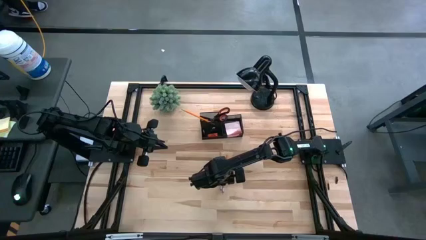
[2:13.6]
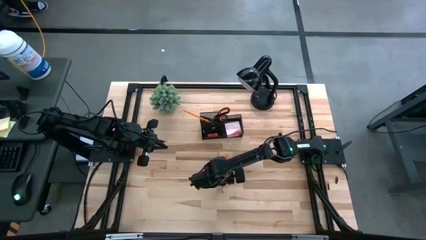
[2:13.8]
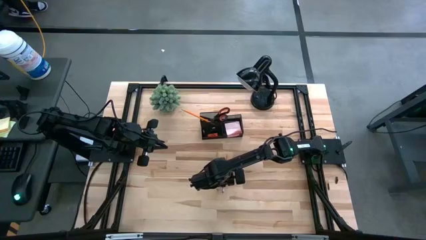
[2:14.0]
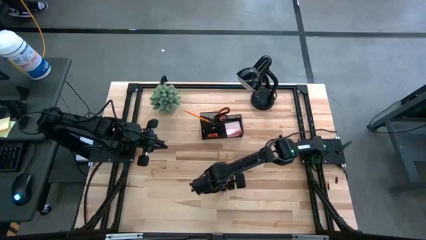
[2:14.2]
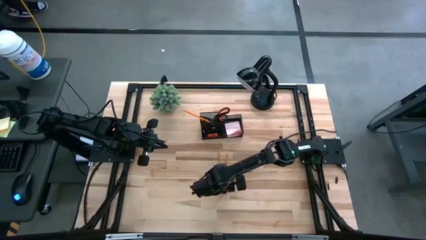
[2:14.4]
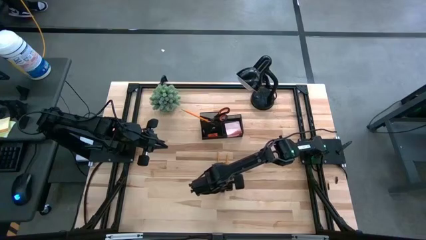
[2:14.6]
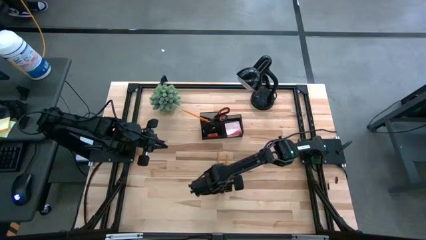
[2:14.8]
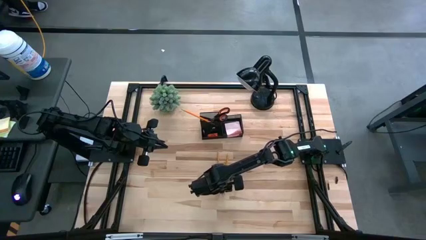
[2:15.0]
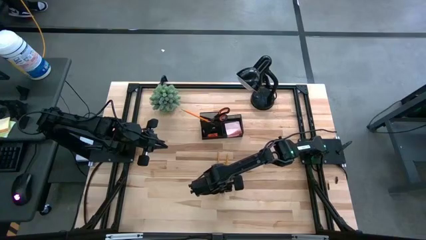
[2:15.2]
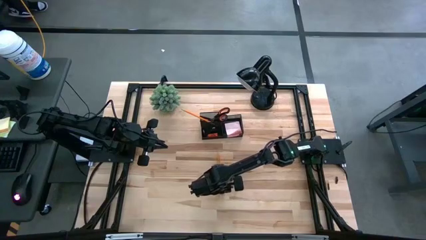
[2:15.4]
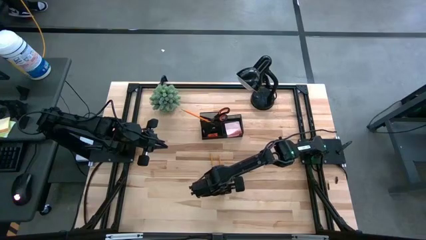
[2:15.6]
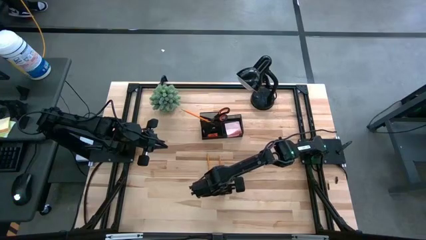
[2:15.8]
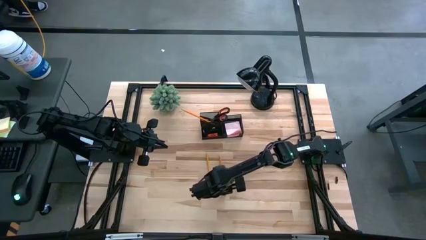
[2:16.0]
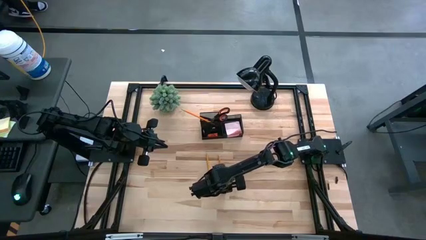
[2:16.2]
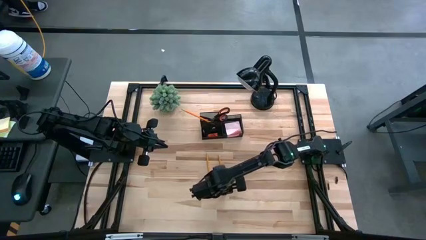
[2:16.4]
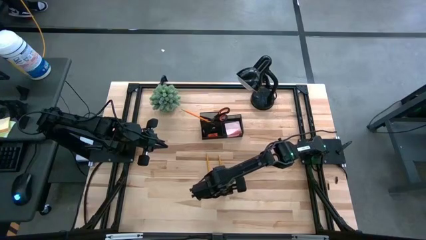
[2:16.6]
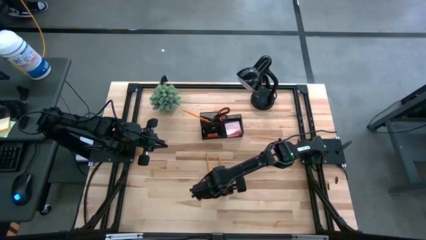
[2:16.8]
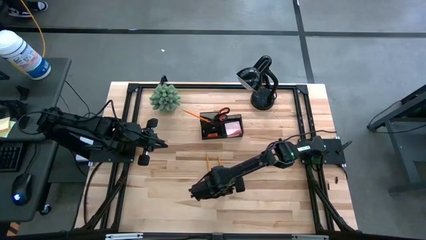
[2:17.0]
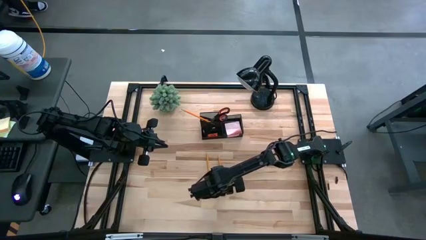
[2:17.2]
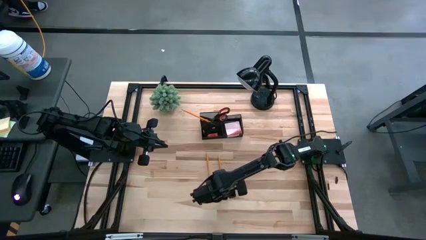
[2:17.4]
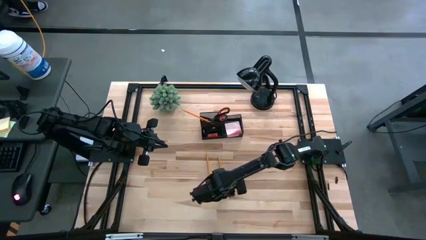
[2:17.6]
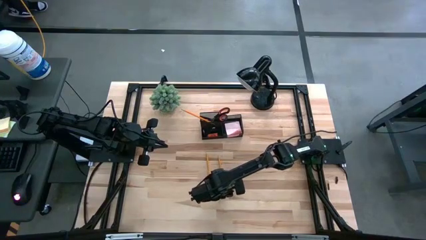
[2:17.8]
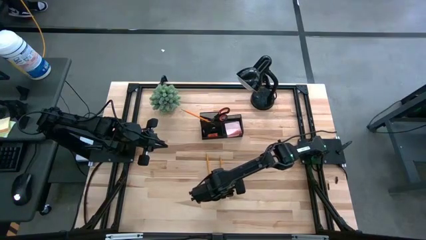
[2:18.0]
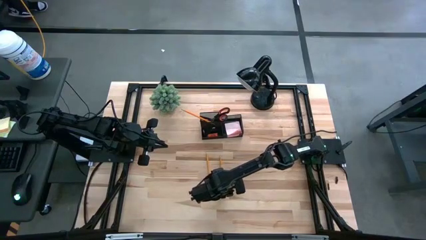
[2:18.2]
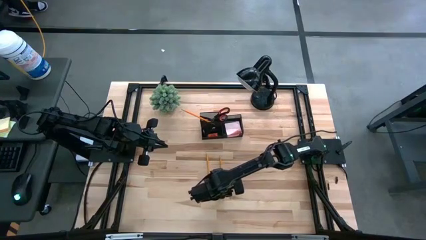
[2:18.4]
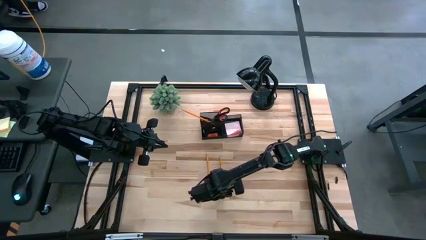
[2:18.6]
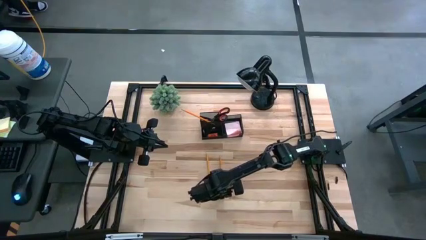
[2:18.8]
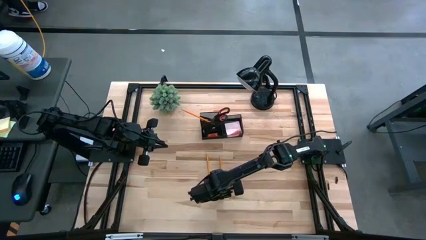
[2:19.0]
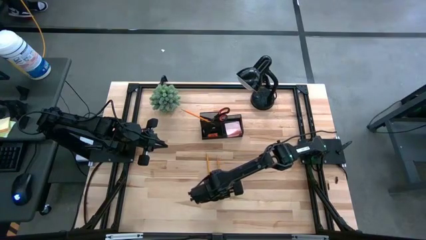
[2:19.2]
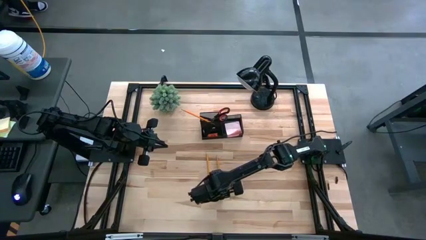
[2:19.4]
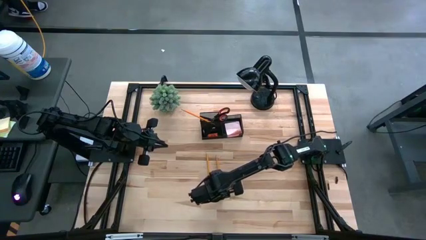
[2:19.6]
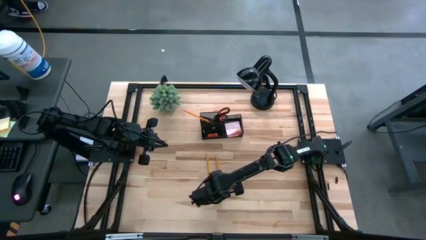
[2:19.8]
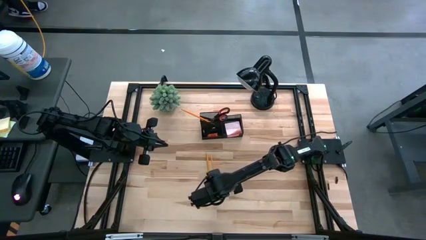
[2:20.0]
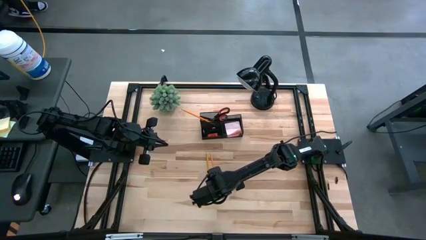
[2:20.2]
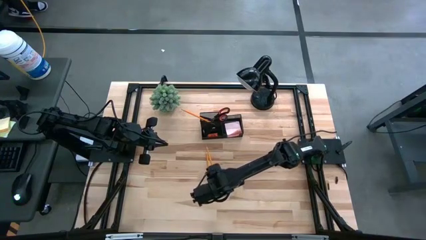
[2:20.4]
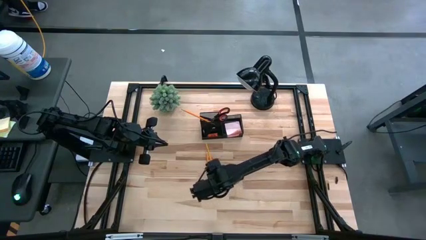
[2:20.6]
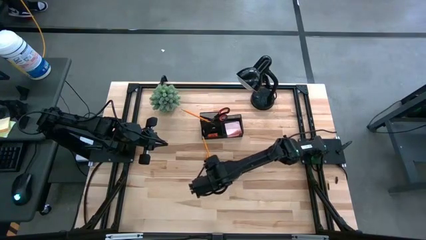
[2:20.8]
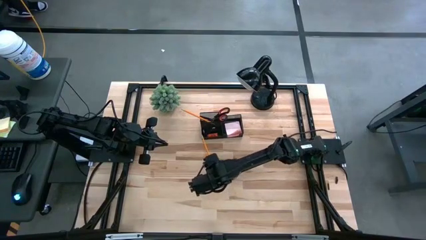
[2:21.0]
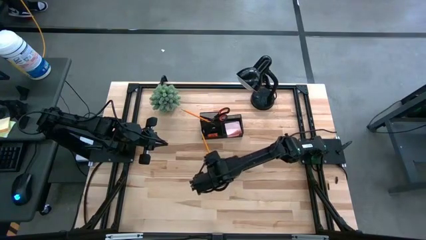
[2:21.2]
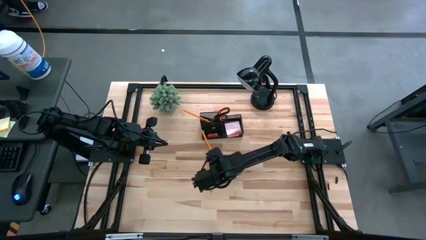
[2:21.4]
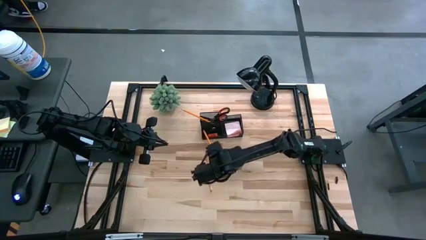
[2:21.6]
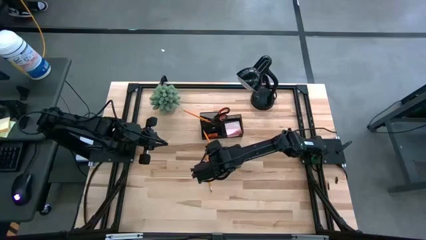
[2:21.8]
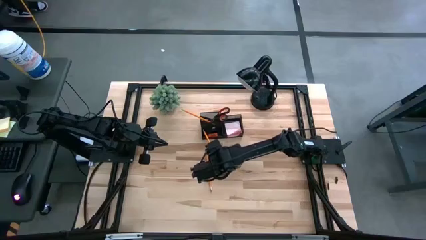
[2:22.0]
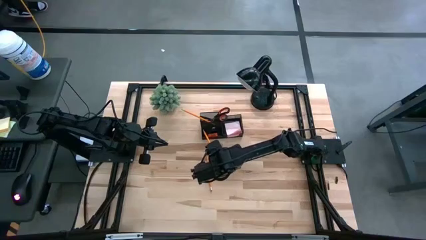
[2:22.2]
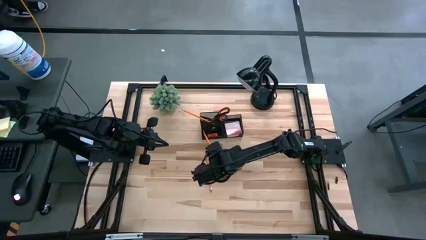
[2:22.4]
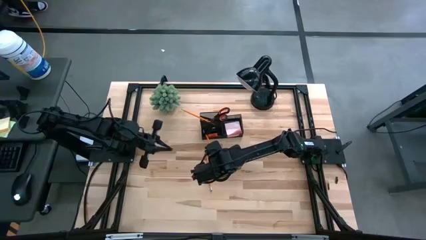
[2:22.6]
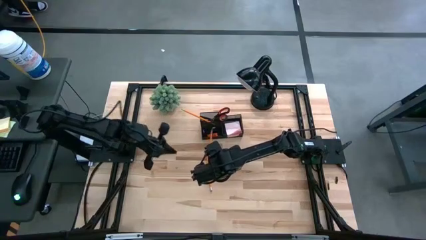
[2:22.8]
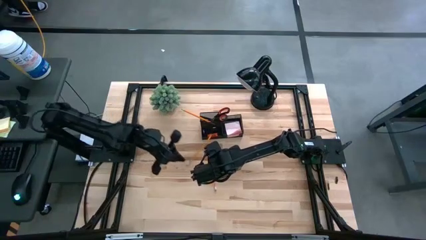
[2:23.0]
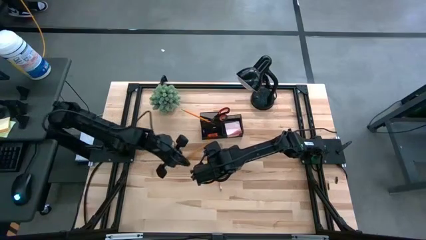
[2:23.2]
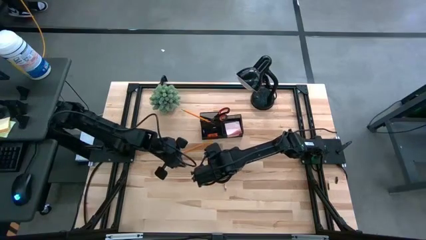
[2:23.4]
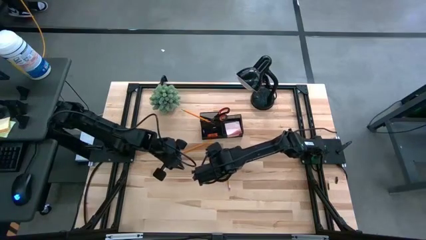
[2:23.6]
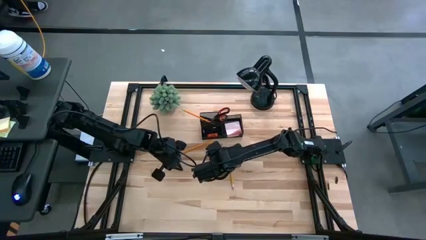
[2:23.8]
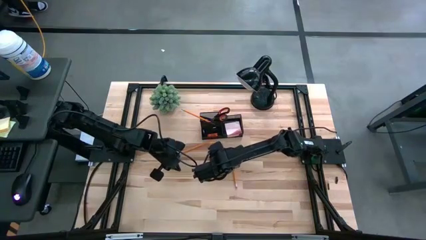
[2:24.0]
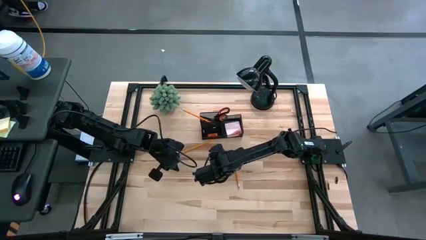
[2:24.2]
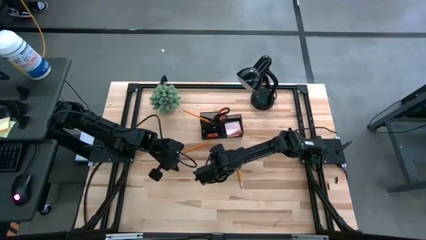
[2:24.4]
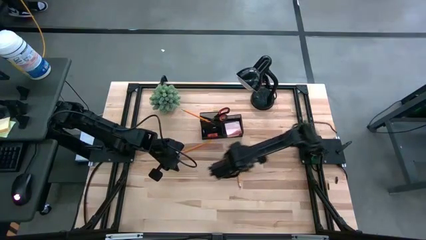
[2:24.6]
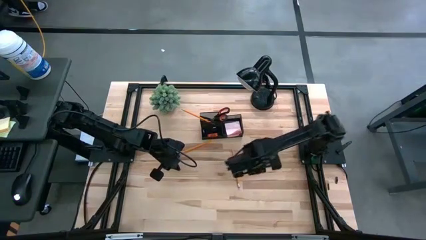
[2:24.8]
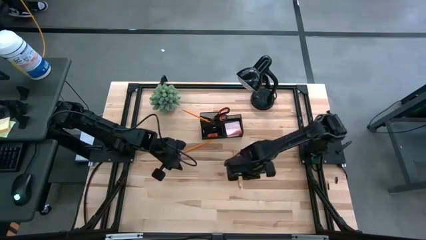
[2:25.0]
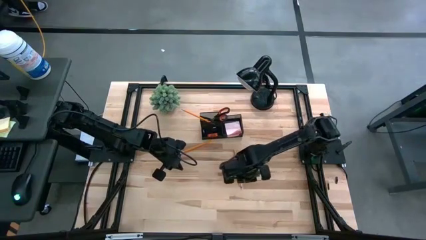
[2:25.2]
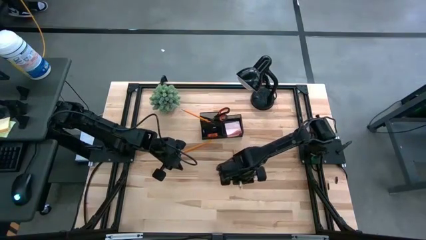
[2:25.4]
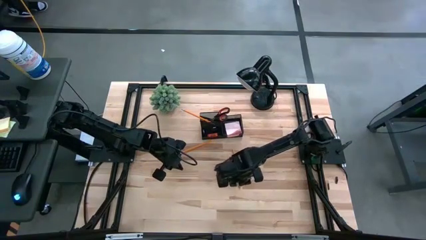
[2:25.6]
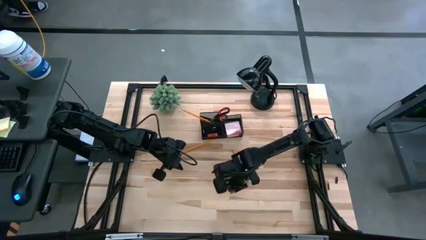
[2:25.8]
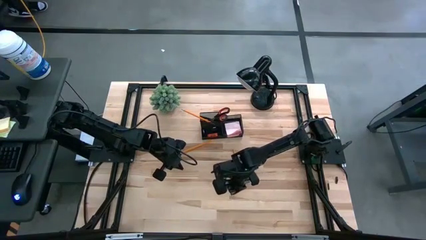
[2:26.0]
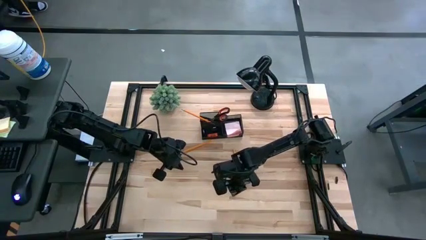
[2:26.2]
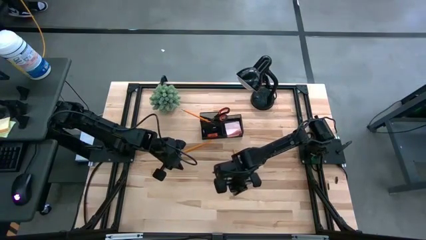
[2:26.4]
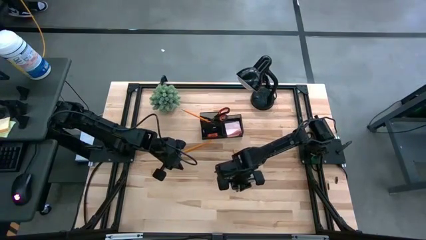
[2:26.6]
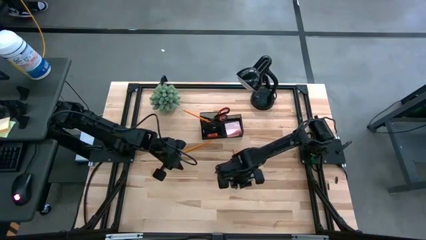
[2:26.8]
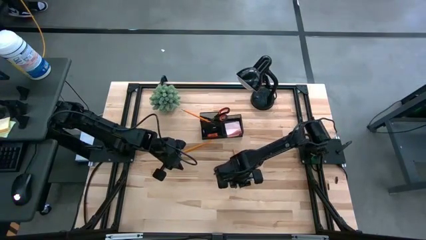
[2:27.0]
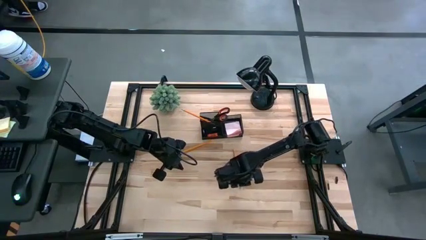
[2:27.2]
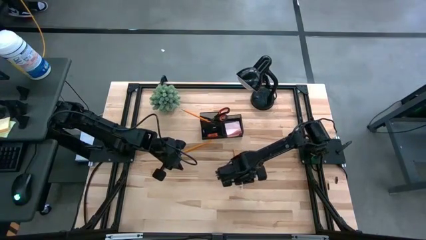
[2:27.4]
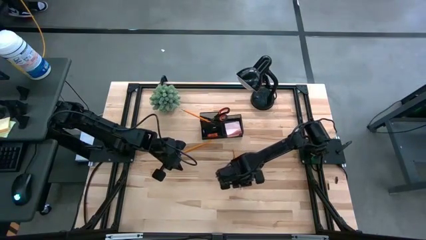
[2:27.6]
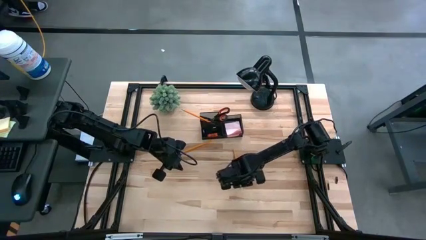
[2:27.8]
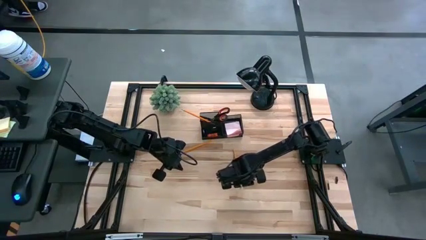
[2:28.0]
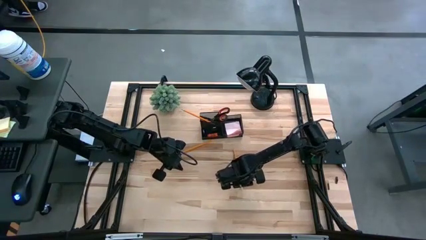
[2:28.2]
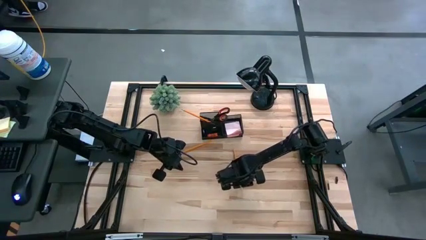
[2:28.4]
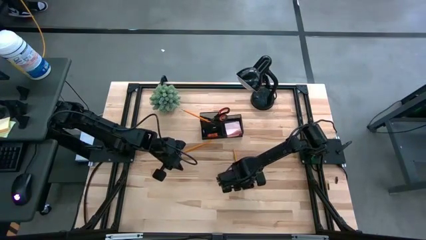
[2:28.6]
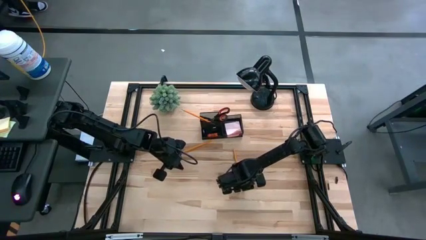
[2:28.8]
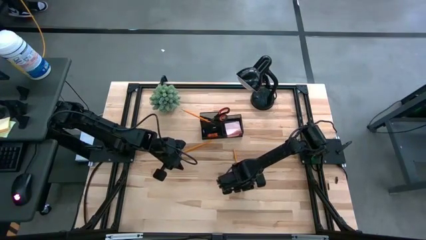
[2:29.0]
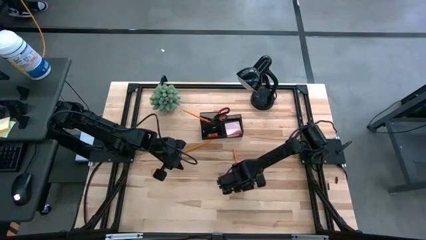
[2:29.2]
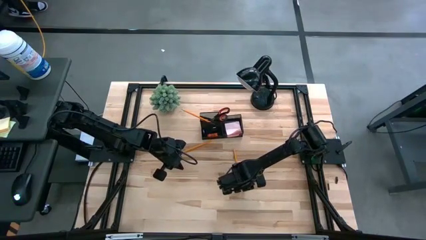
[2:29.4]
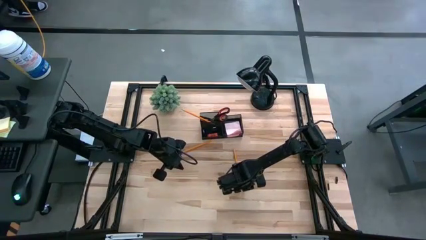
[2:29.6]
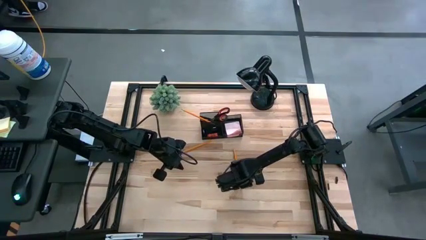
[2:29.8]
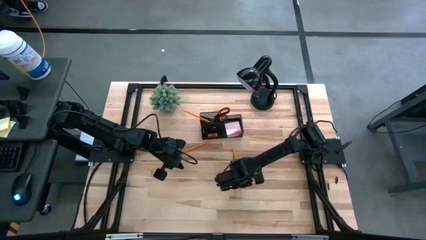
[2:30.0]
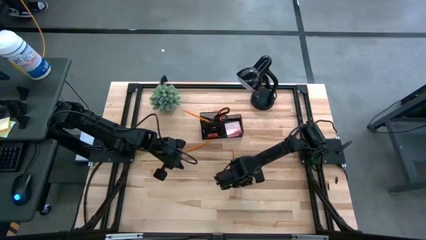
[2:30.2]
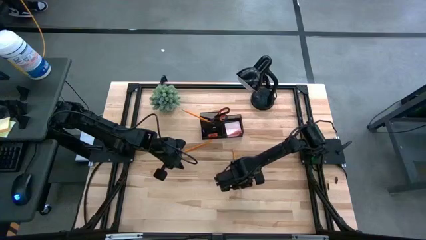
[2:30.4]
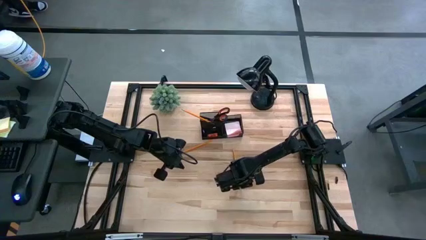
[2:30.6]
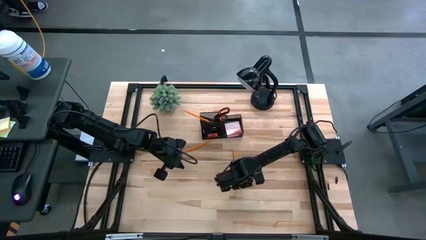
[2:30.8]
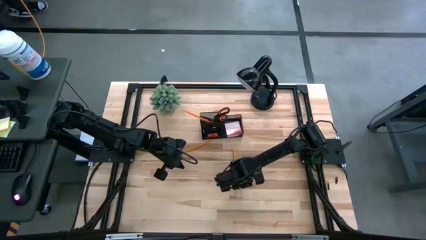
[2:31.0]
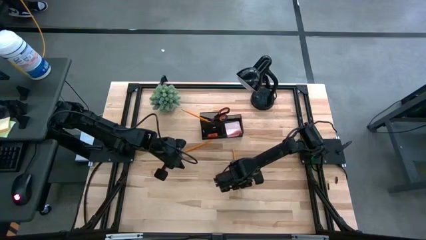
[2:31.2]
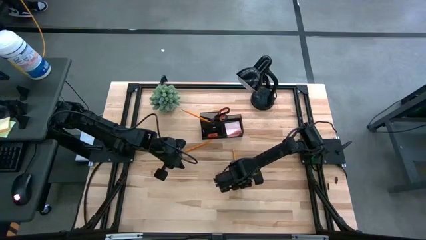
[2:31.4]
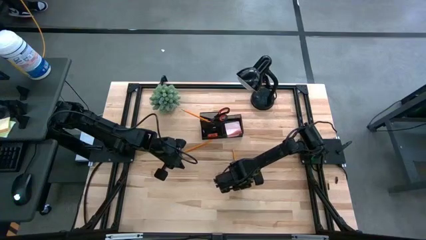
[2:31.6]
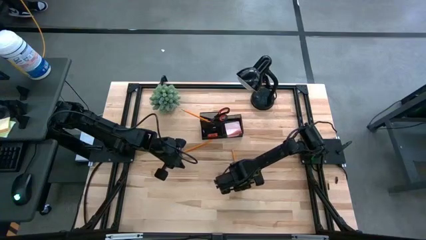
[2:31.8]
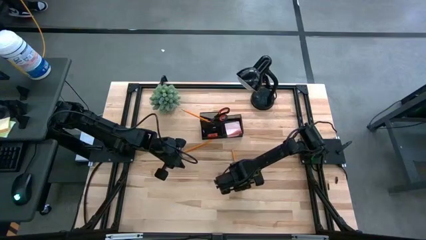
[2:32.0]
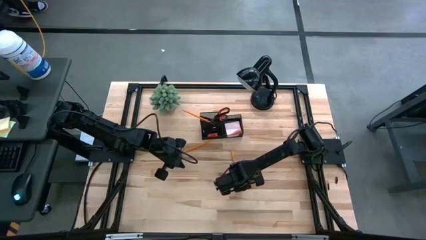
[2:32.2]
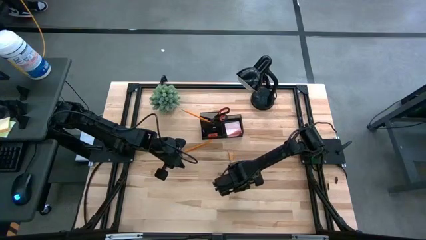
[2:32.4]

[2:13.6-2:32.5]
Task: Pick and place office supplies into organizer
Put the left pencil into the desk organizer
